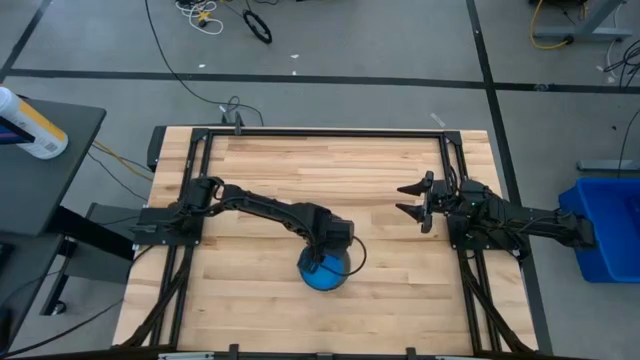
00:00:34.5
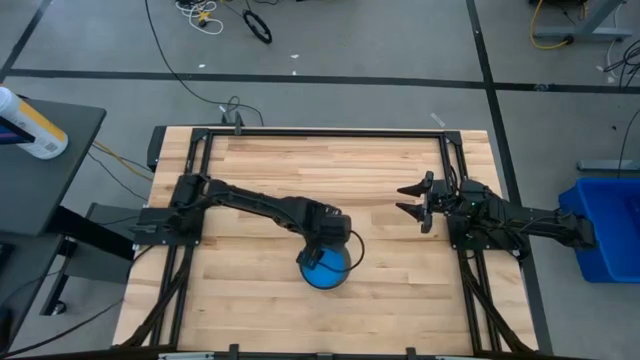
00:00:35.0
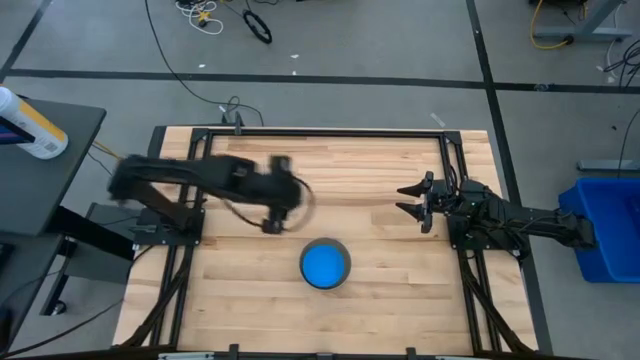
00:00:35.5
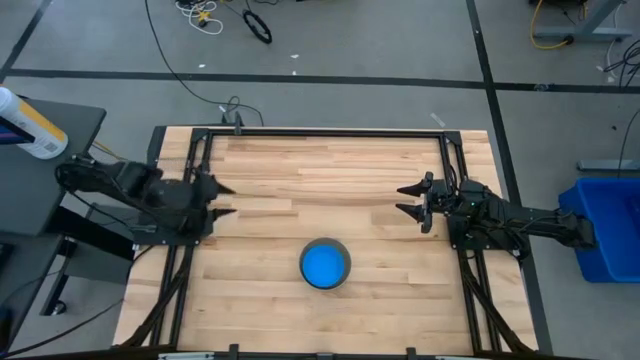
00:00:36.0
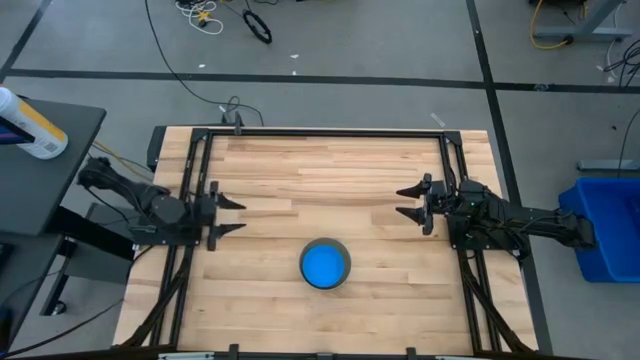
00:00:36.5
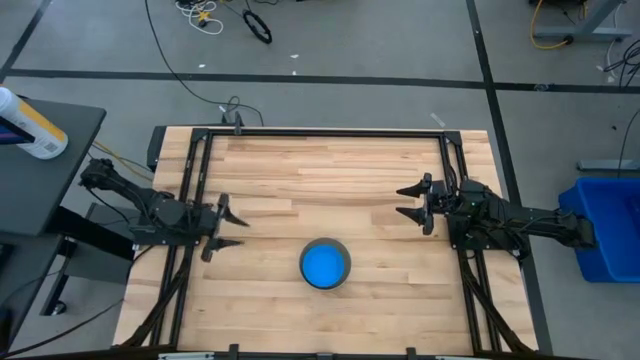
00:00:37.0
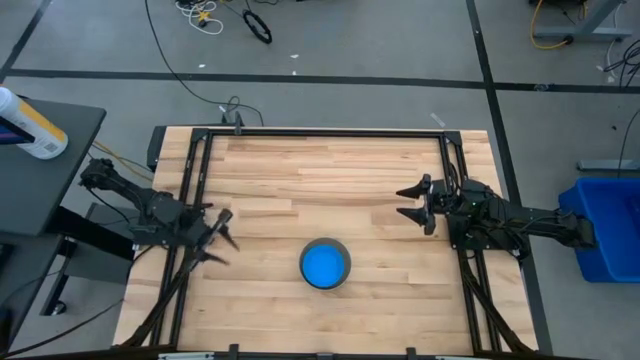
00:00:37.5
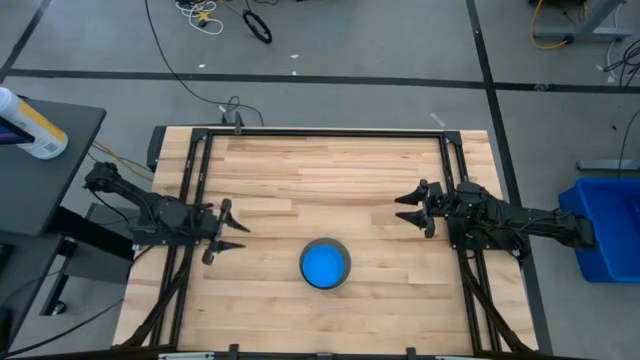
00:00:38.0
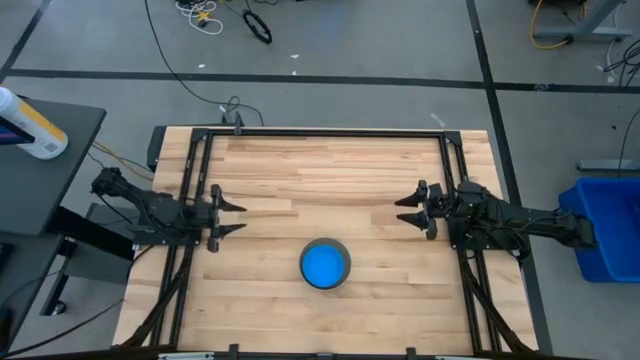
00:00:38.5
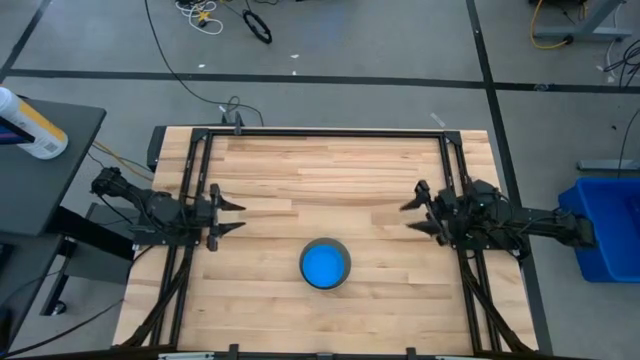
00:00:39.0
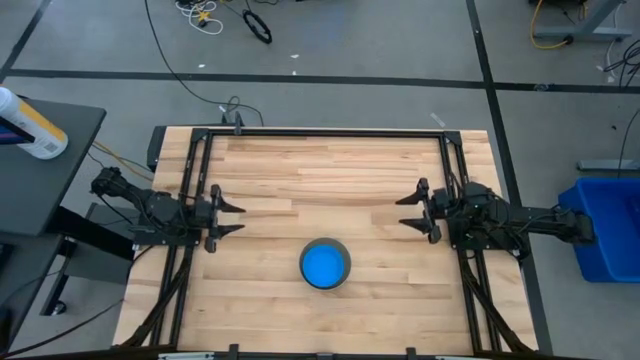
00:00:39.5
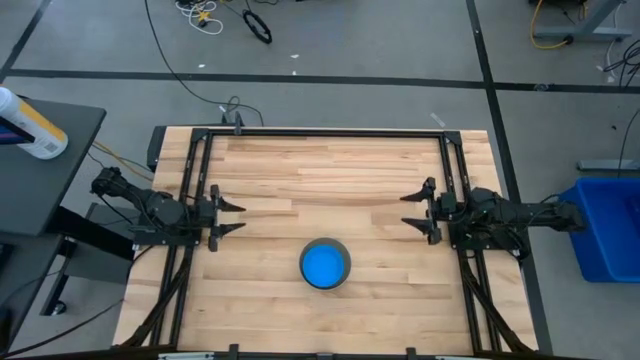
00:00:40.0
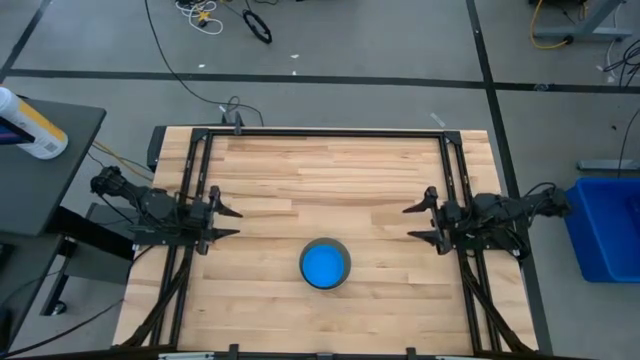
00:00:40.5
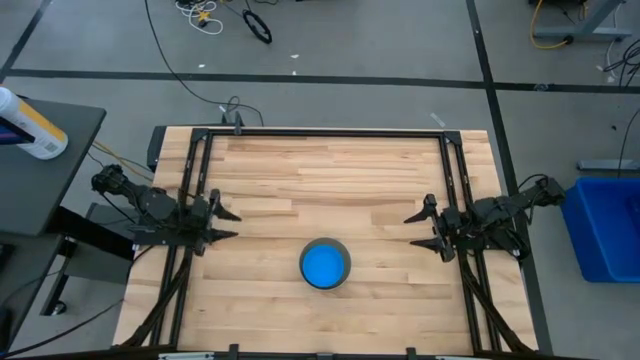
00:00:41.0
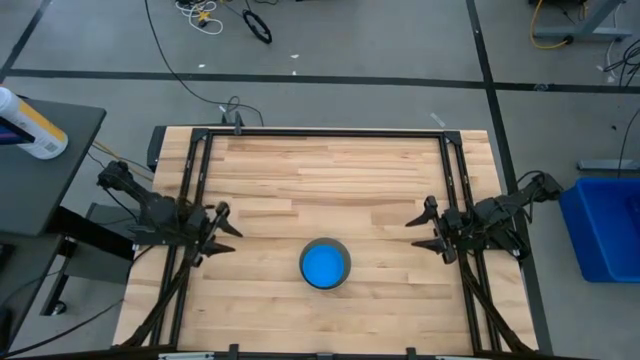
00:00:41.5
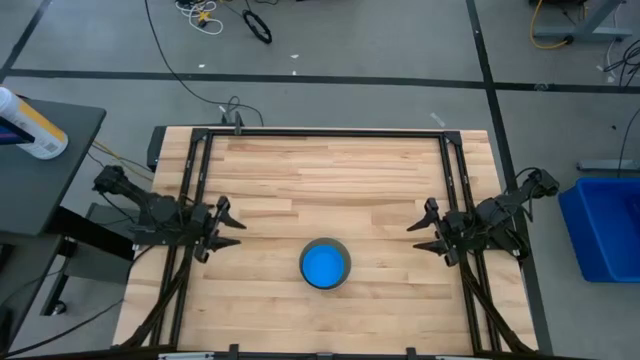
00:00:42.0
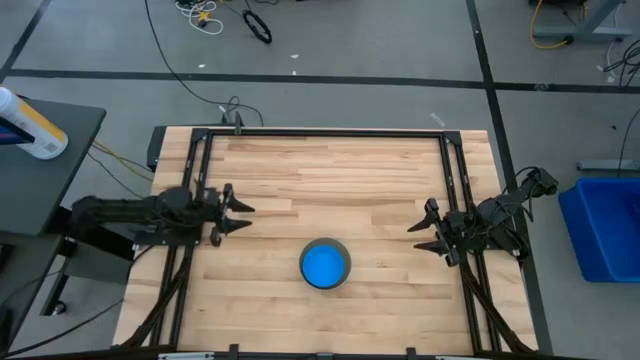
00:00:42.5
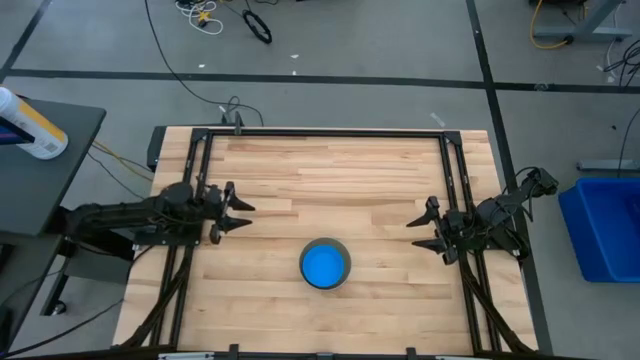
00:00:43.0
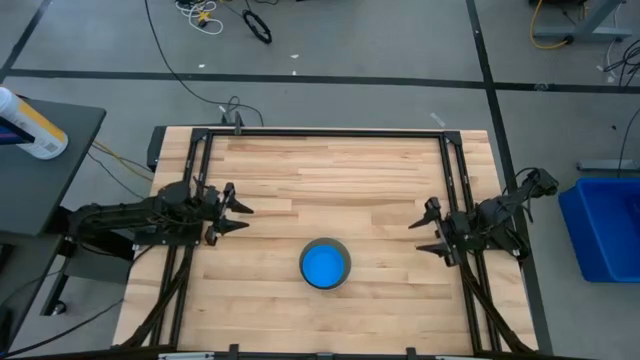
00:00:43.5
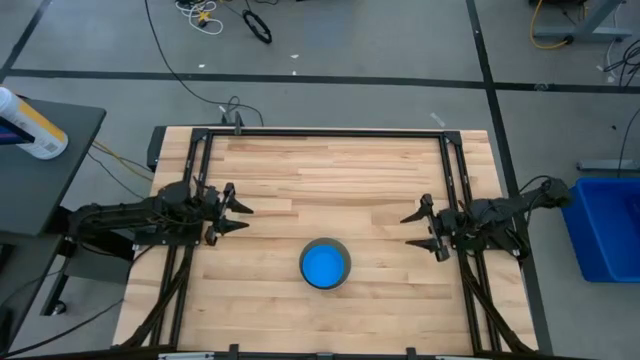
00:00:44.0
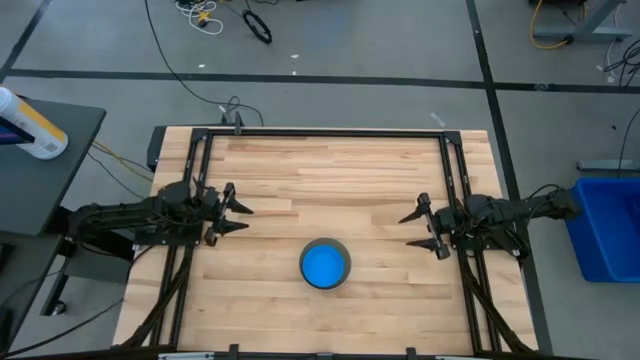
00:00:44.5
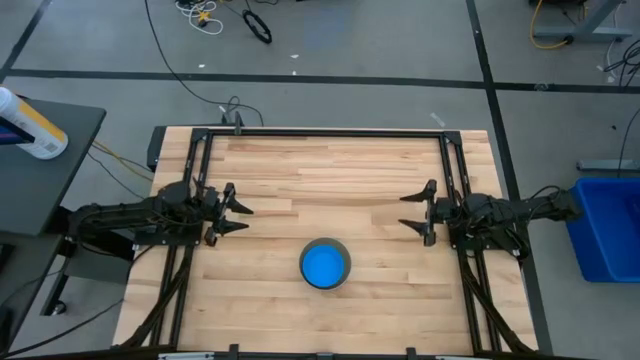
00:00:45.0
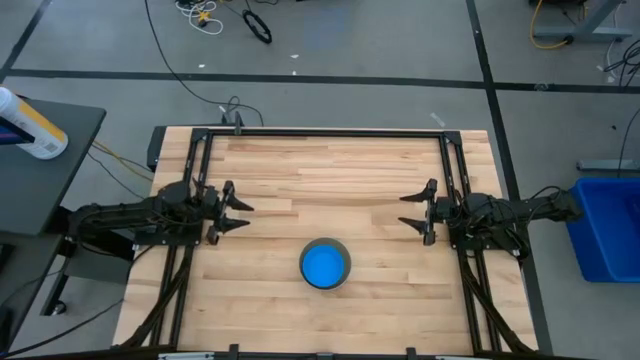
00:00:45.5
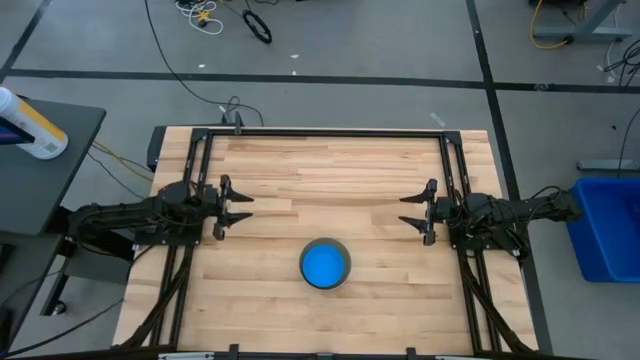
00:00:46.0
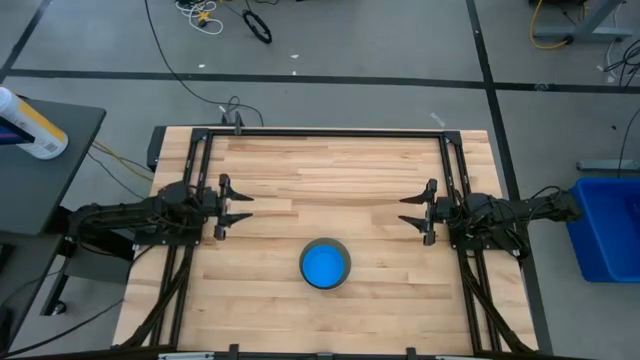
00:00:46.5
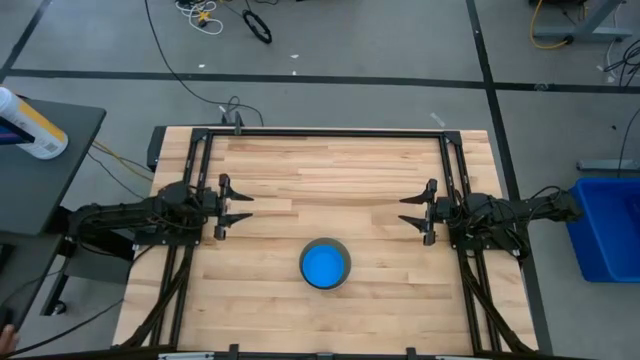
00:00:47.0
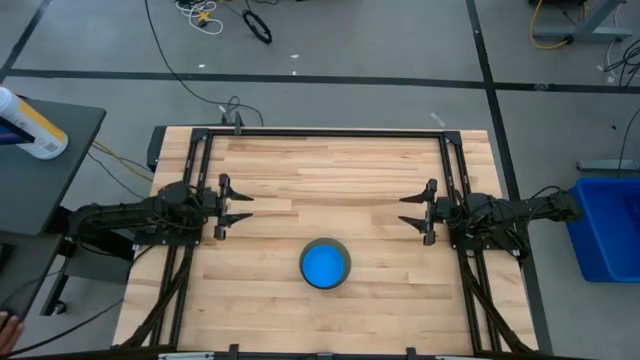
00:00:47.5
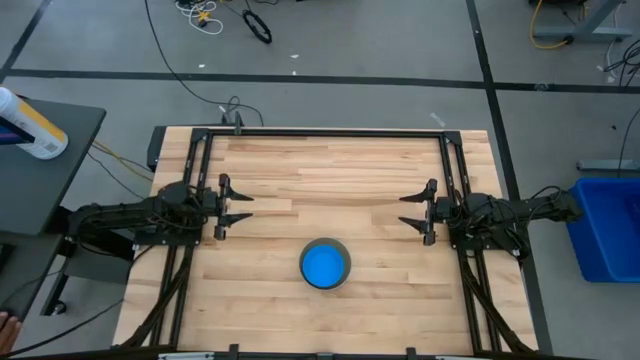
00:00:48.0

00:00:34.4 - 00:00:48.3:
Return to Home Position

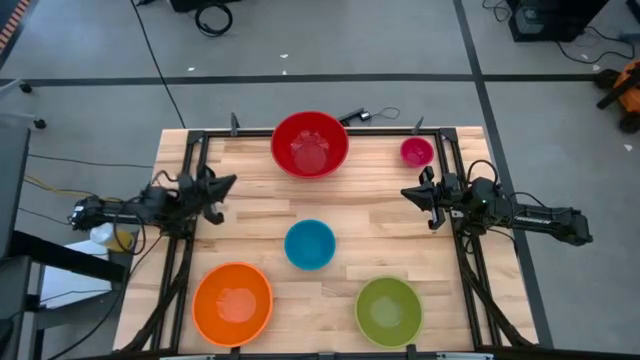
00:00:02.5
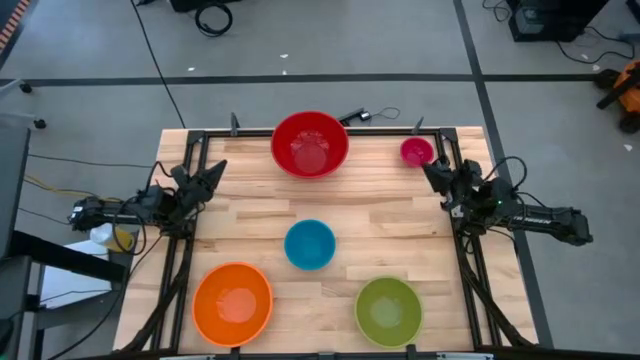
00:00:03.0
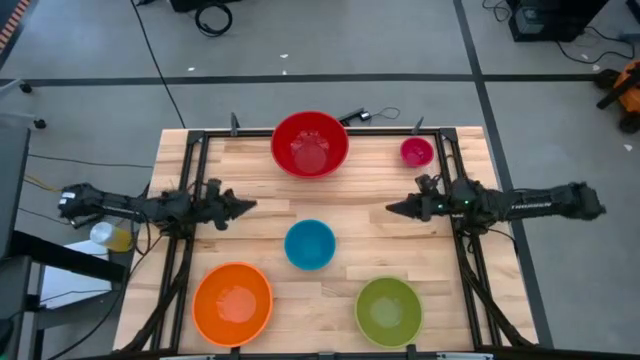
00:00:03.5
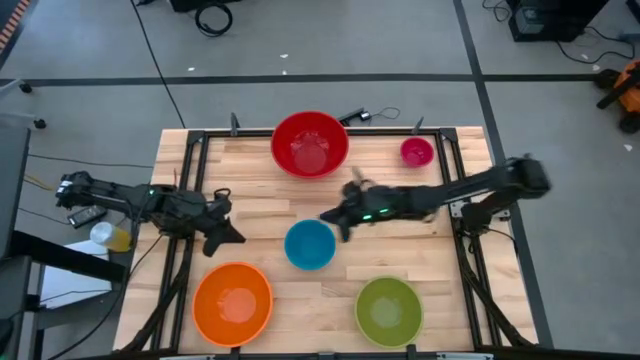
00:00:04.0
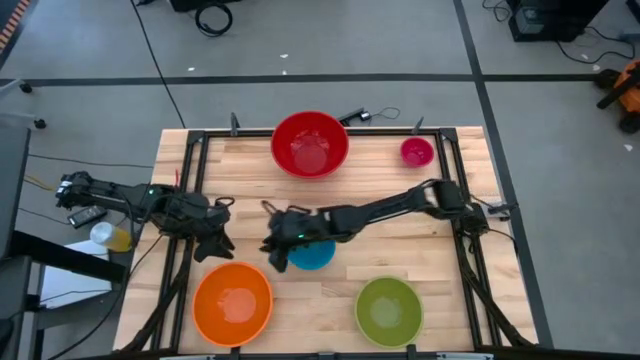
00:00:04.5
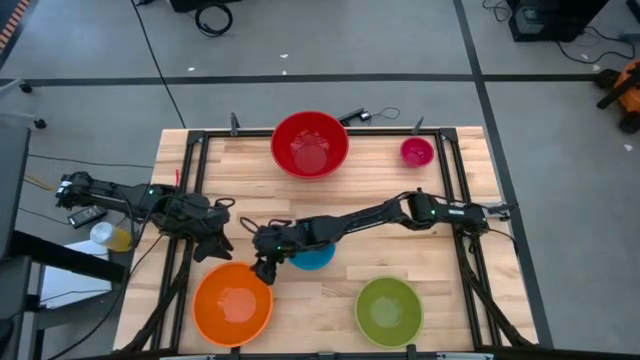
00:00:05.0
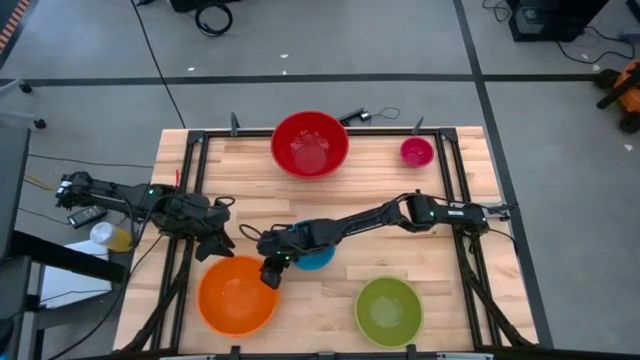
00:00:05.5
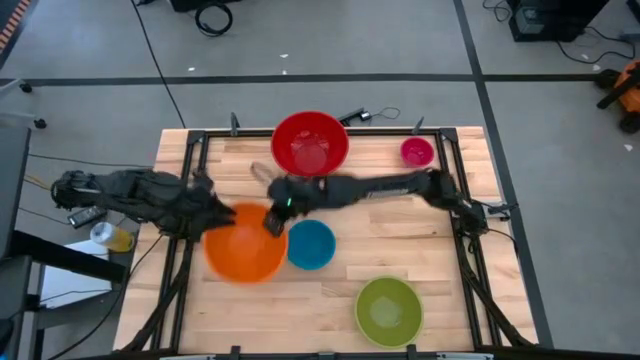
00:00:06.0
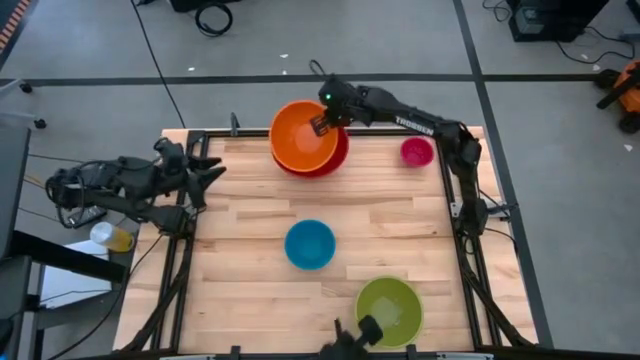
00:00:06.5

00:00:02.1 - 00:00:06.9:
Stack the orange bowl into the red bowl

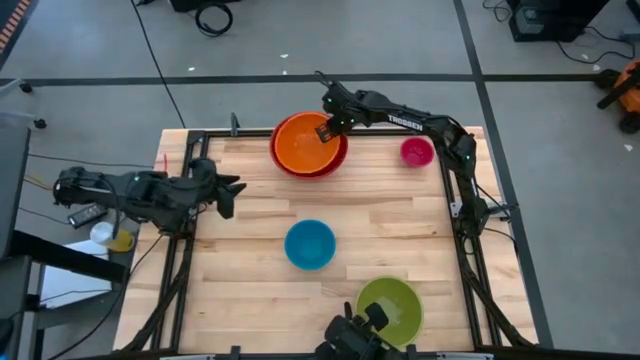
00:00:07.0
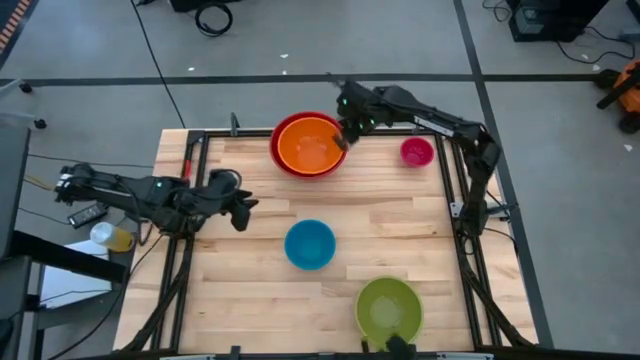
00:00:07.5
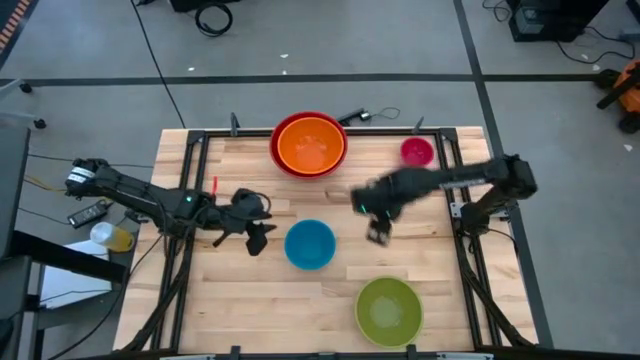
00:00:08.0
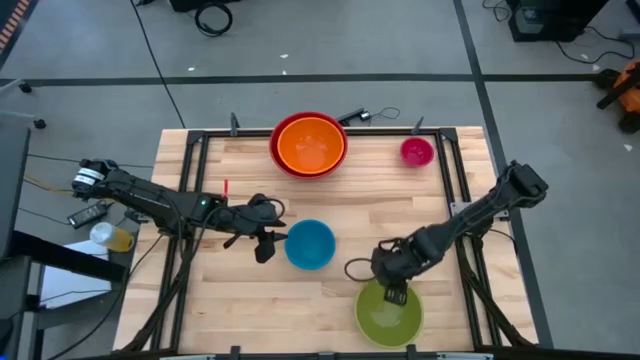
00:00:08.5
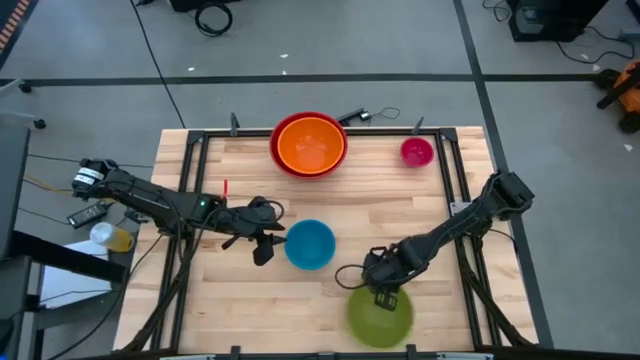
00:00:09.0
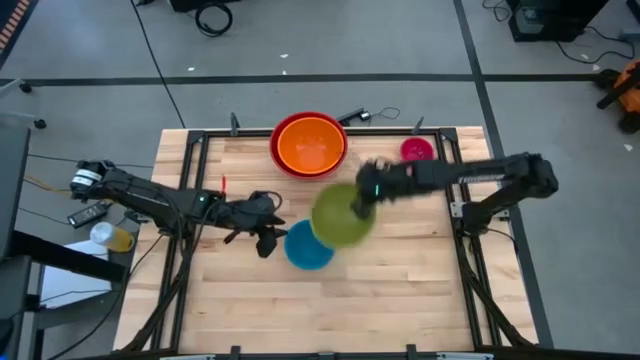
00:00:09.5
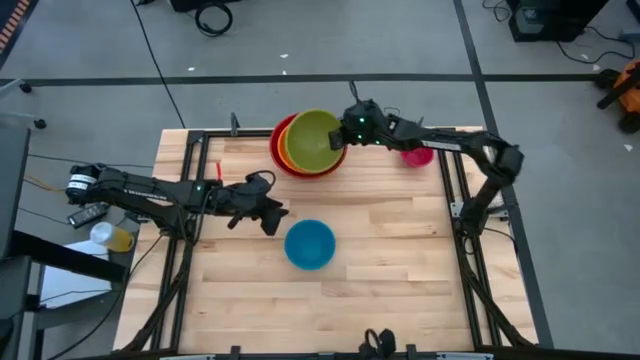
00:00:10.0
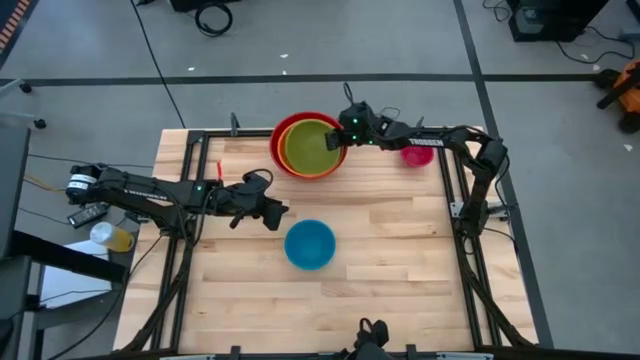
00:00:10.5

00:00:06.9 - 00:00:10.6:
Stack the green bowl into the orange bowl
